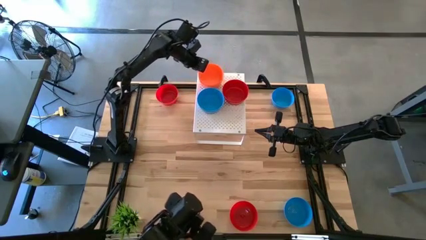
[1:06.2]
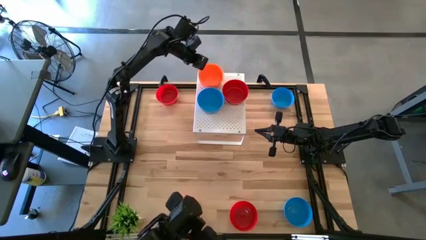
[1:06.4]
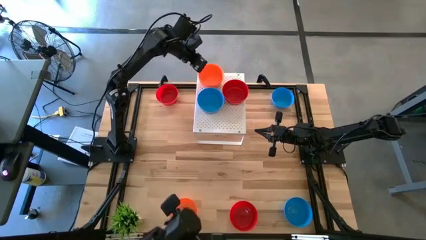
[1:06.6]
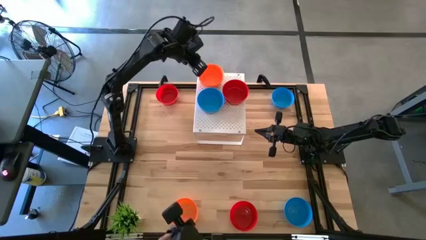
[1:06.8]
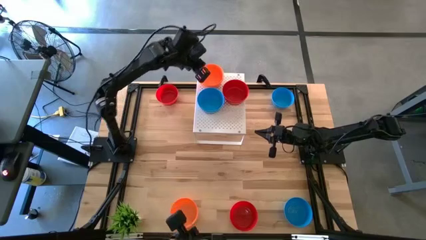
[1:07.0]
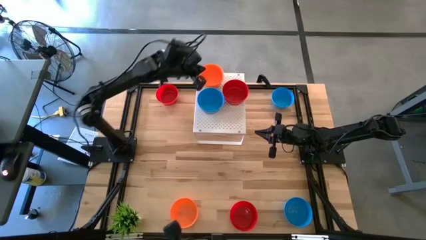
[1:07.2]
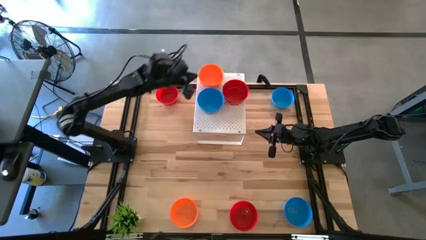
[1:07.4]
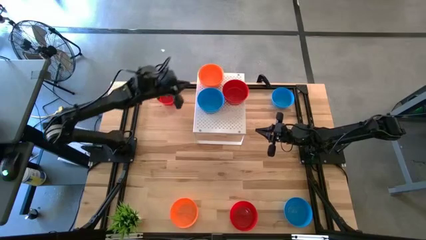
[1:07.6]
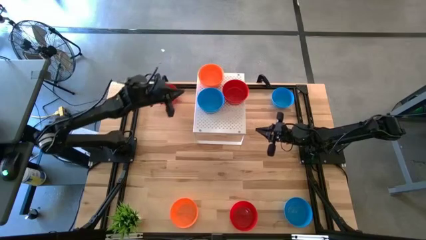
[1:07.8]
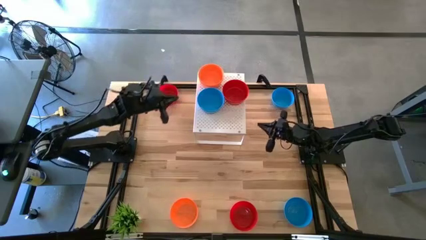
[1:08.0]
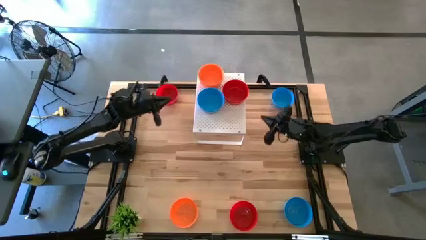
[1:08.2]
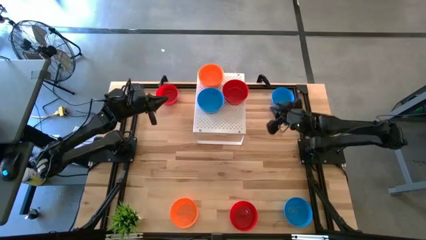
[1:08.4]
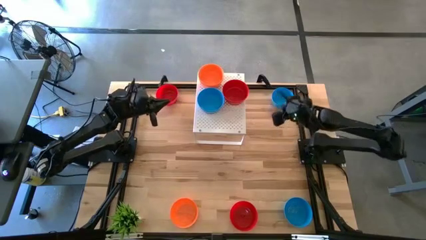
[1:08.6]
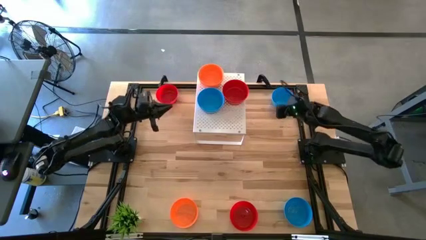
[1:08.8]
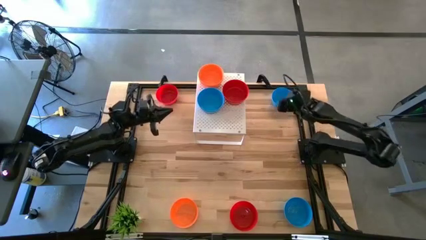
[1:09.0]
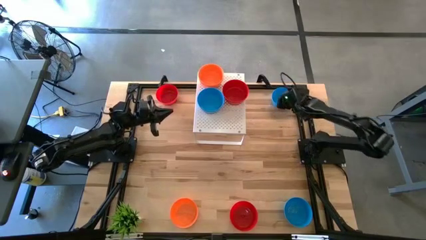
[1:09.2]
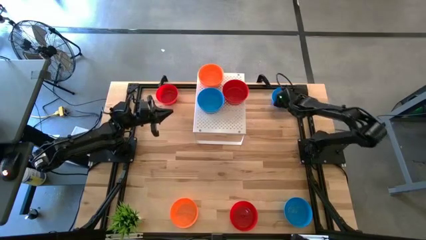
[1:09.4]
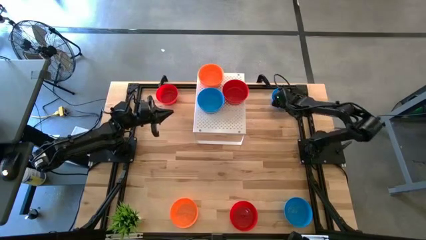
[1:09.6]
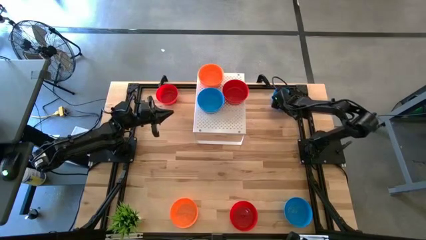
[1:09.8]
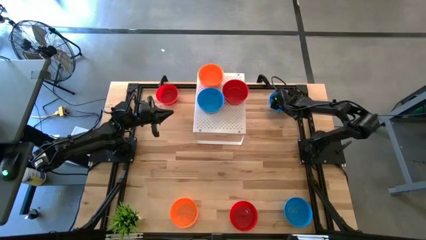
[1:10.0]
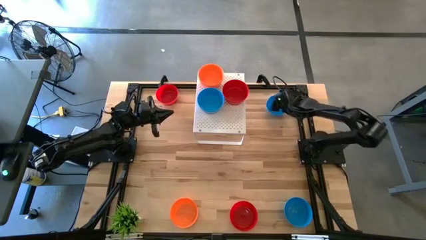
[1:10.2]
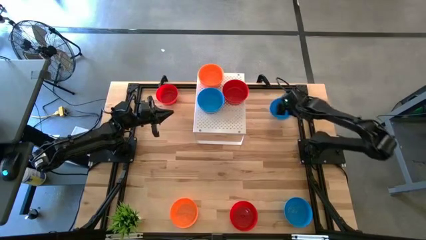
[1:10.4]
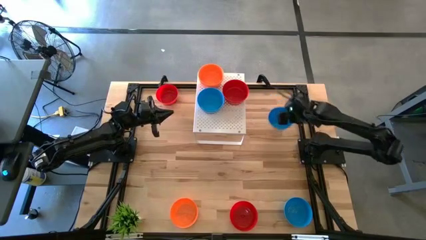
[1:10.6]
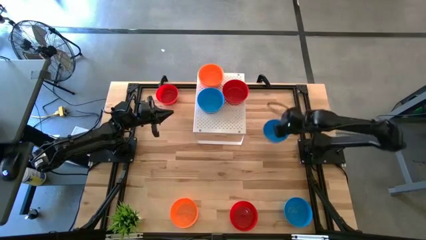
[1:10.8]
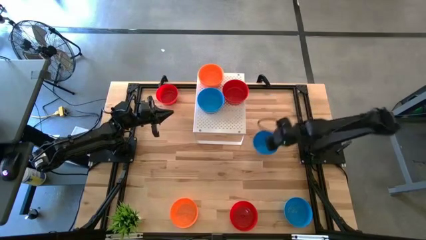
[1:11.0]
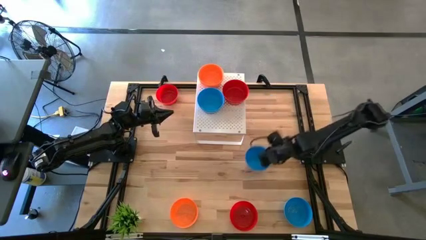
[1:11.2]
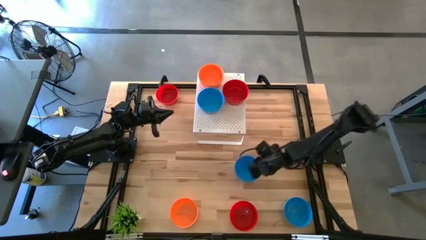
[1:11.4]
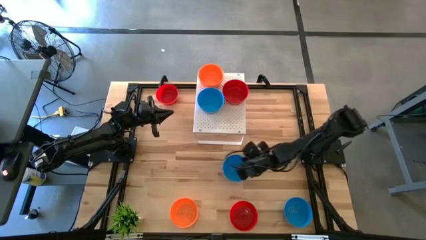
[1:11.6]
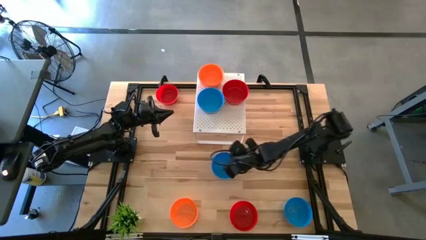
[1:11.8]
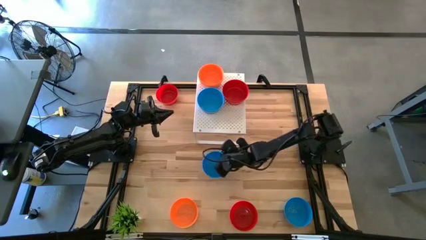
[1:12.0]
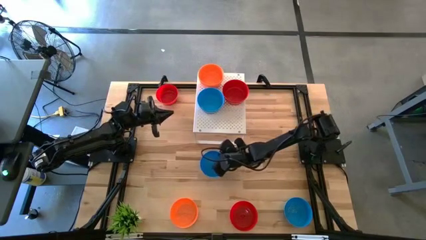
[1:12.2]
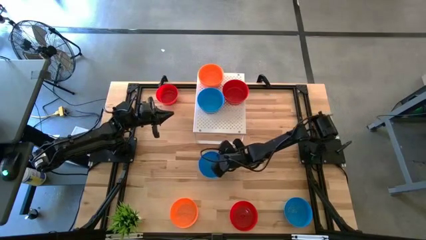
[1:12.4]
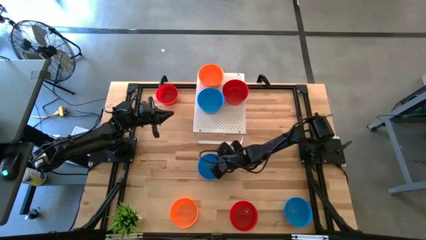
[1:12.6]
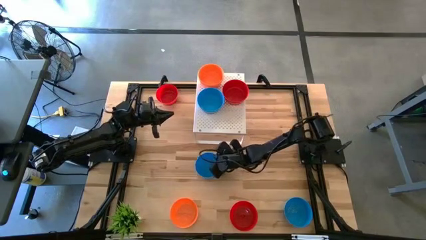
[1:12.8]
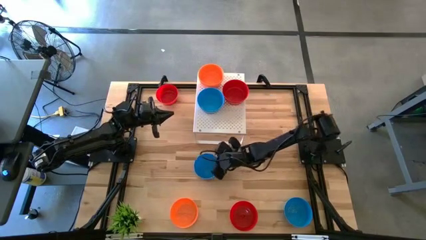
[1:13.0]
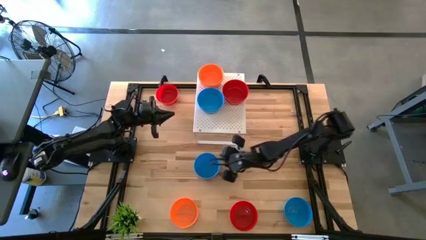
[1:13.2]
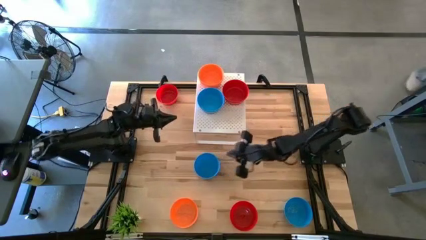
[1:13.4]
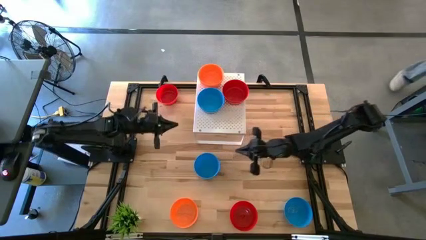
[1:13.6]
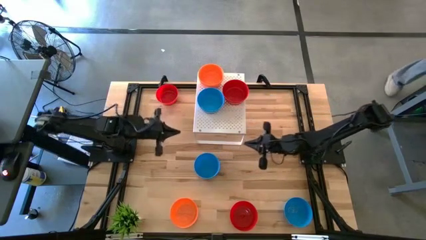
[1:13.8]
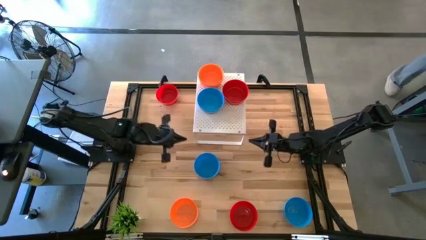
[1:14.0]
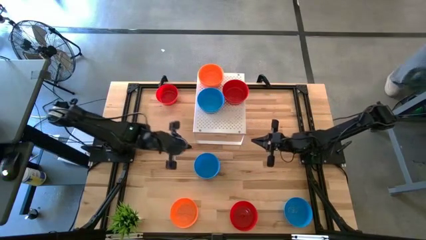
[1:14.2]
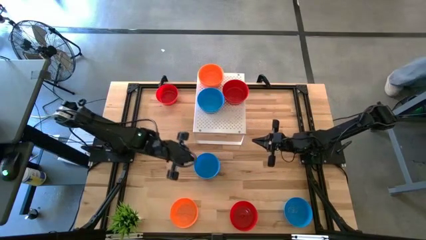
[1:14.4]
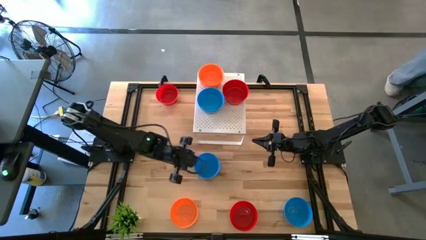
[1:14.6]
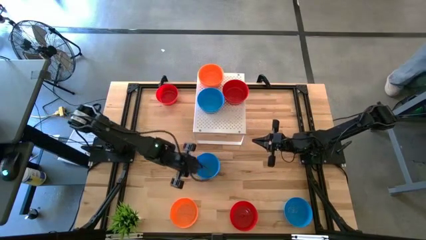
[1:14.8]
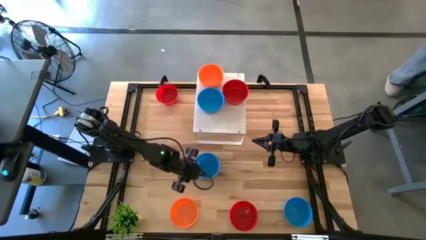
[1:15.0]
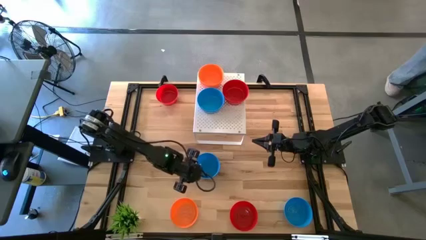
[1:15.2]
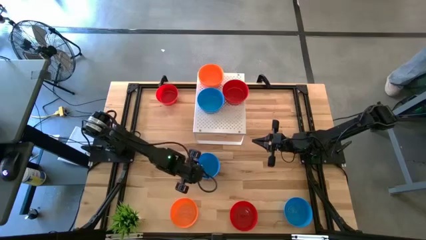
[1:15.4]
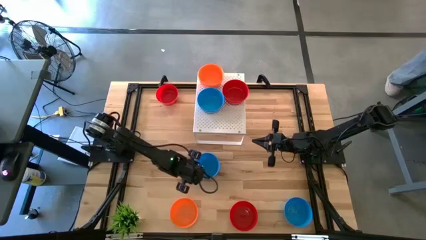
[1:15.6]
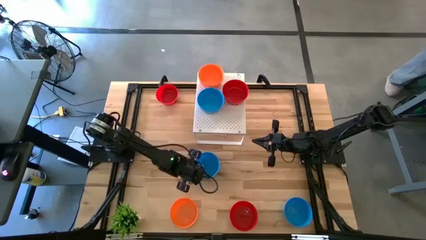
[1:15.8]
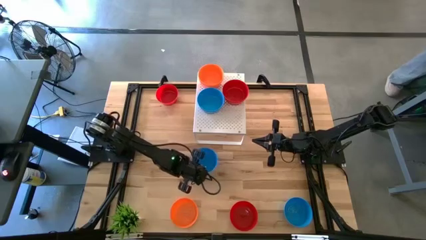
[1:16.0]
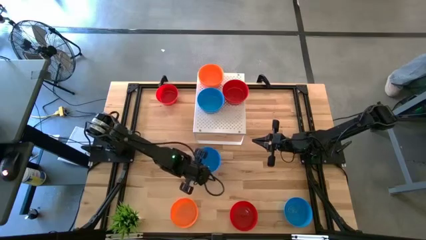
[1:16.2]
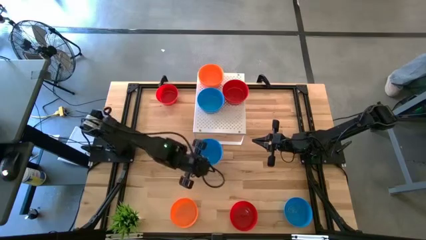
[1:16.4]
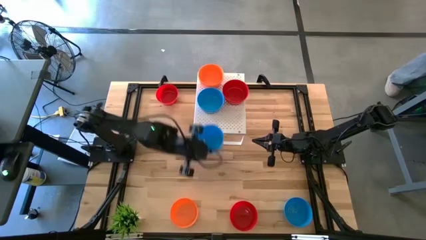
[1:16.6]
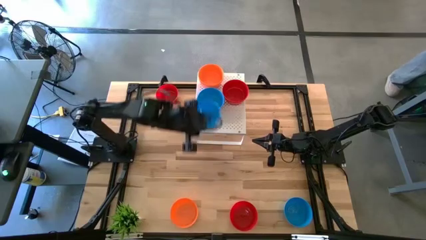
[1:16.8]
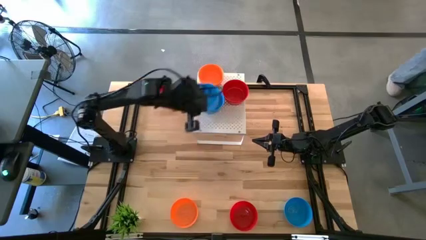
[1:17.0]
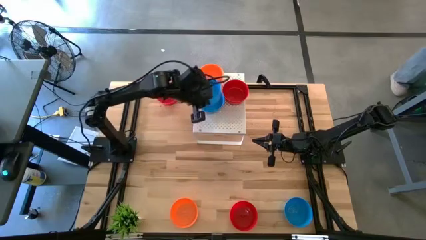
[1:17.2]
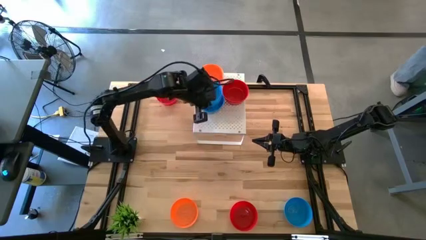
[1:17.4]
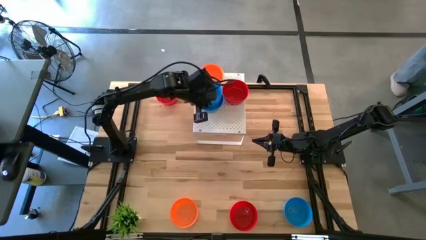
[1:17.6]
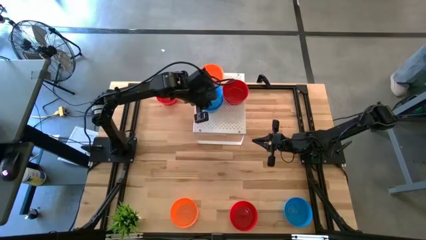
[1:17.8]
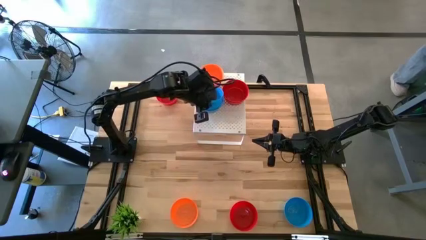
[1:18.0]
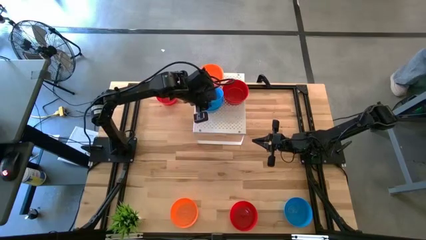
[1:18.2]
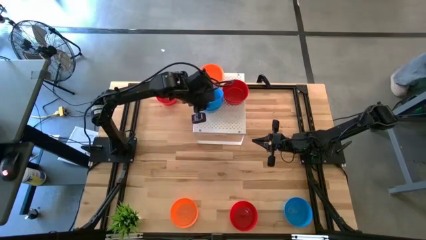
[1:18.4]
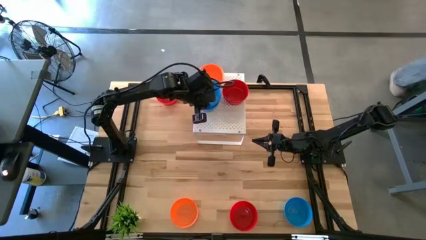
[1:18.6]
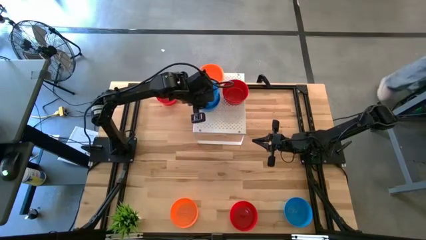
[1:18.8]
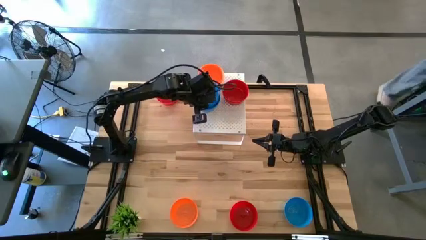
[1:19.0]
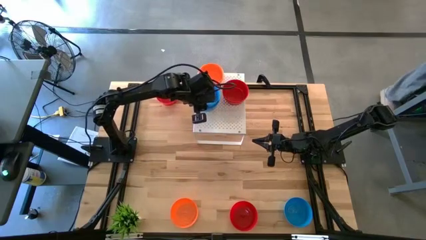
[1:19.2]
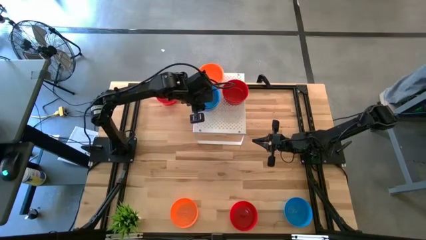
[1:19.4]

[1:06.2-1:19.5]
Task: Pick & Place Mini bowls
Stack the blue bowl on top of the blue bowls on the shelf

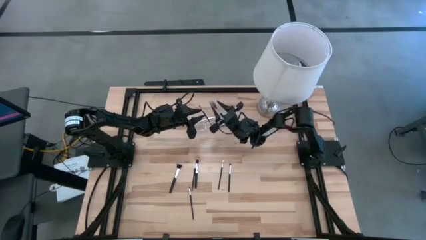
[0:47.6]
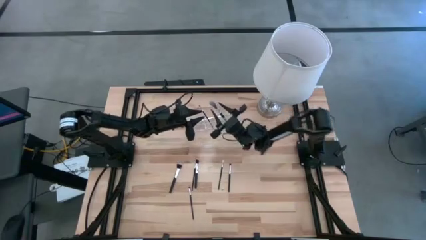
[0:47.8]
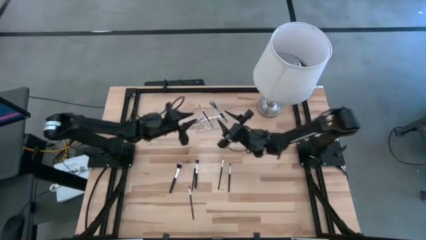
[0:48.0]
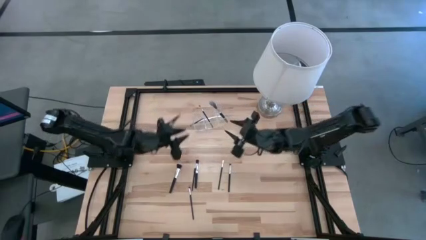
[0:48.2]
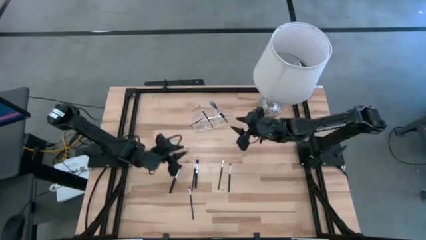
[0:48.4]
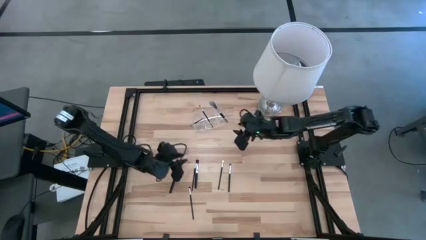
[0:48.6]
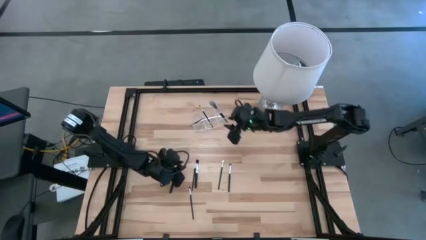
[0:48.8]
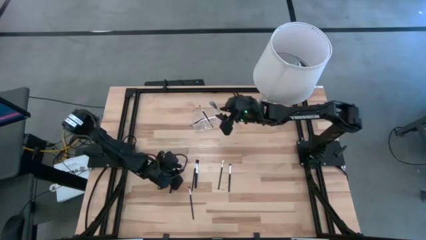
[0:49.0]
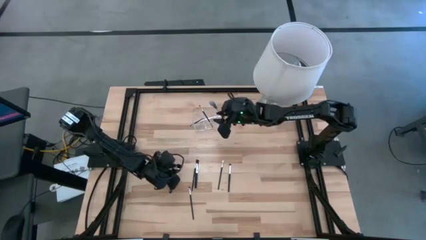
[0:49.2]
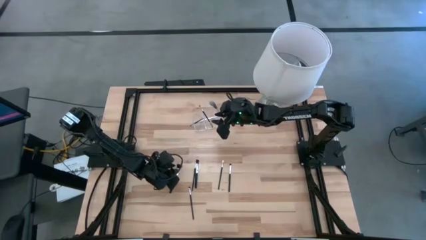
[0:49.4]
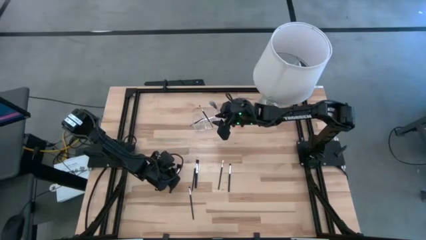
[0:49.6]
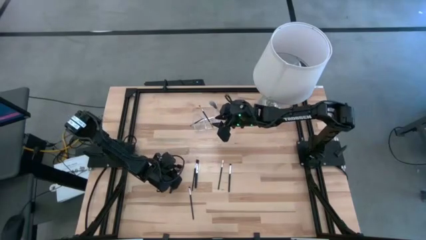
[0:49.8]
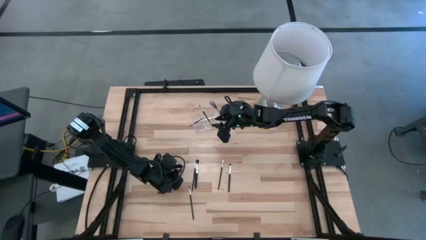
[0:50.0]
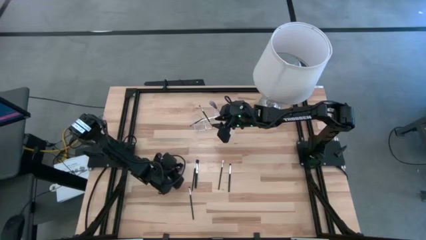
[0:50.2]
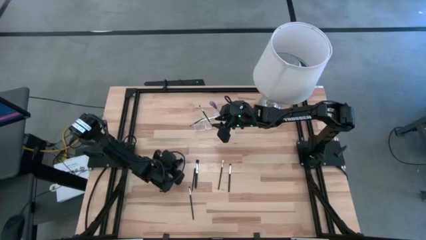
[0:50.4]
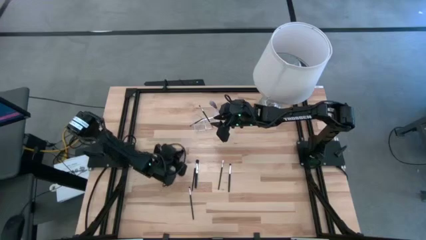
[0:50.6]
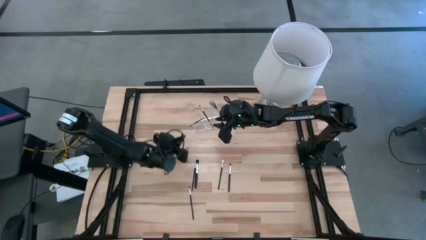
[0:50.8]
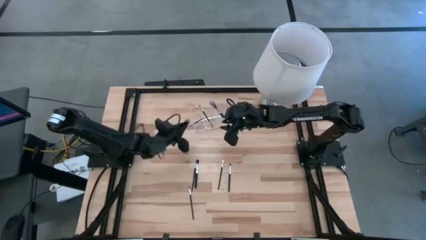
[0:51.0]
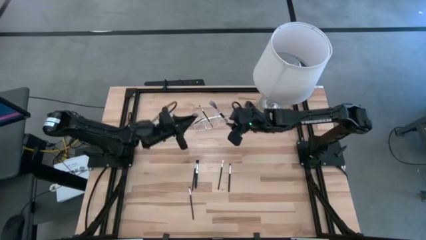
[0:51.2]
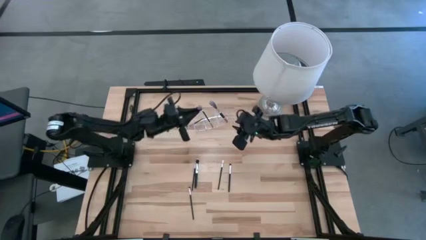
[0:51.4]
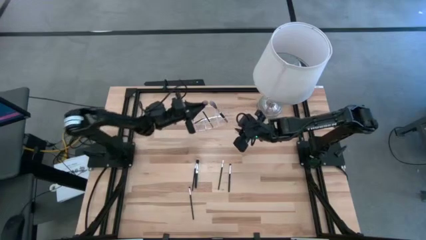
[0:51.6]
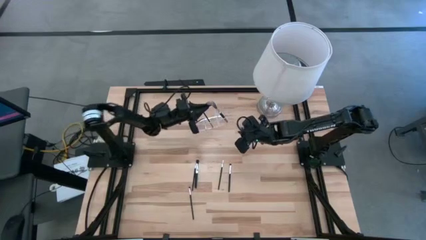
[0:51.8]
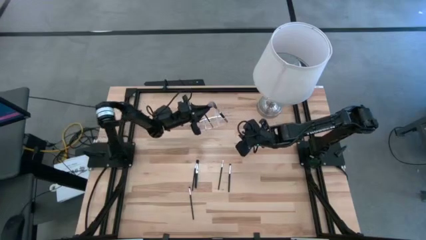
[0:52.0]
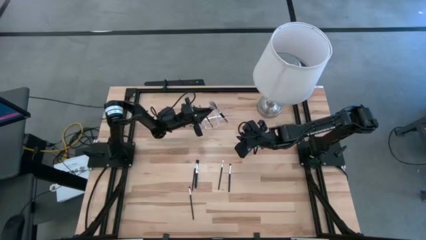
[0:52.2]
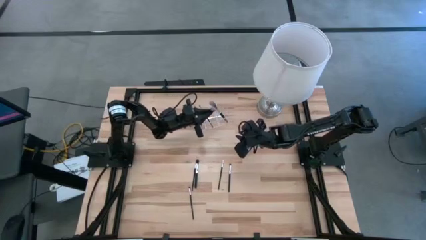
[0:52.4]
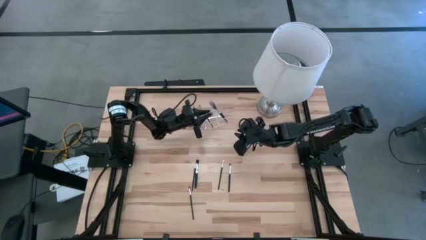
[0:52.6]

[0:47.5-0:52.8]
Task: Sort items
Put the left powder brush into the transparent organizer
